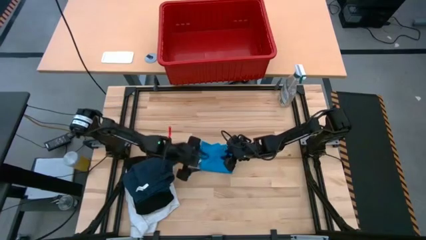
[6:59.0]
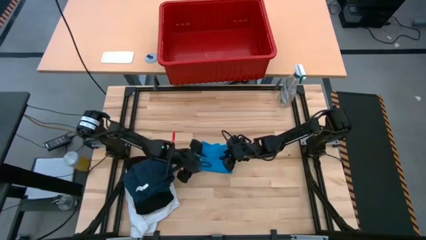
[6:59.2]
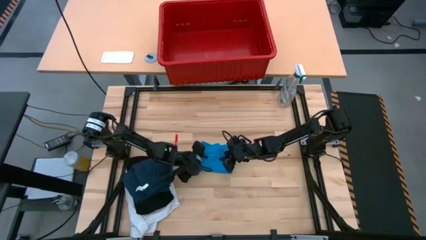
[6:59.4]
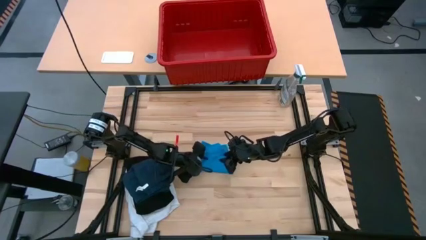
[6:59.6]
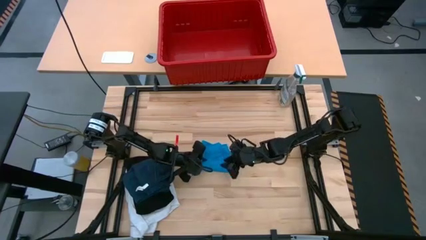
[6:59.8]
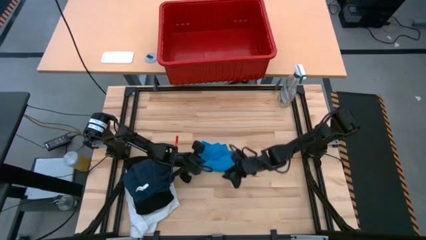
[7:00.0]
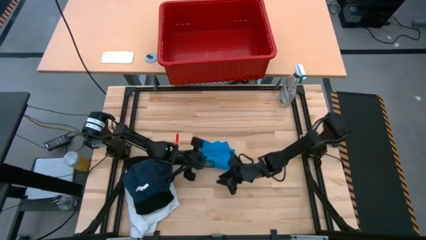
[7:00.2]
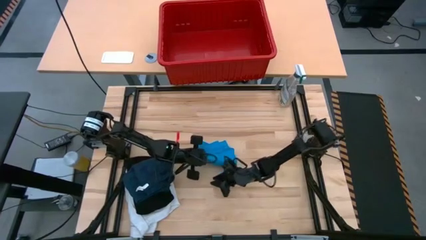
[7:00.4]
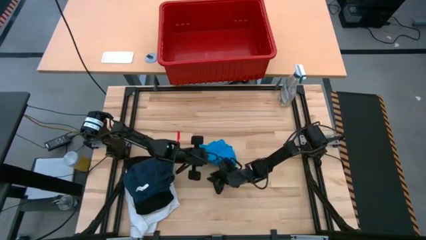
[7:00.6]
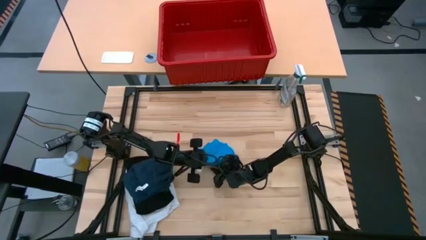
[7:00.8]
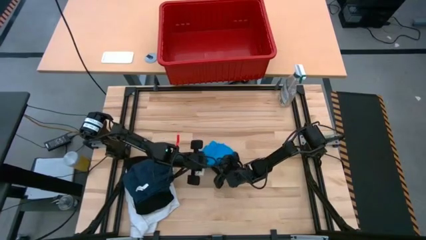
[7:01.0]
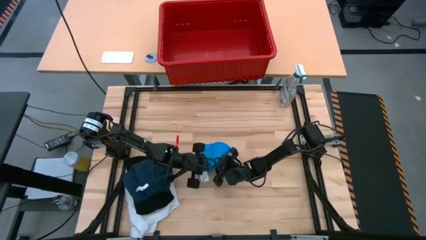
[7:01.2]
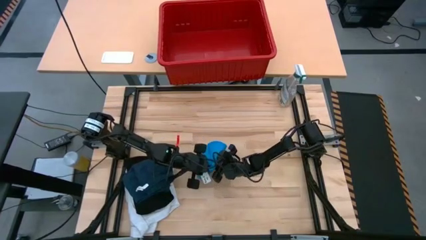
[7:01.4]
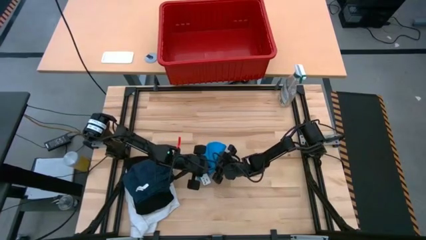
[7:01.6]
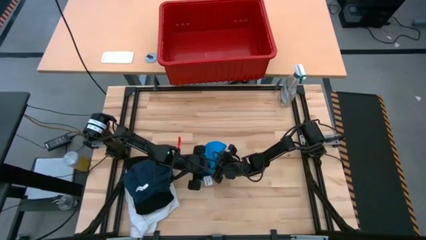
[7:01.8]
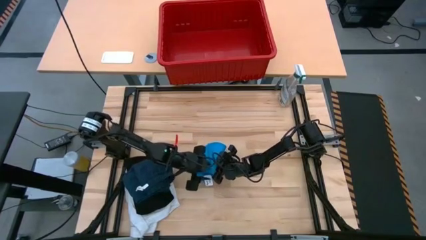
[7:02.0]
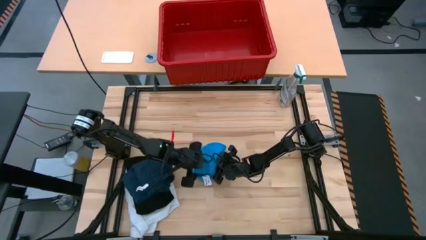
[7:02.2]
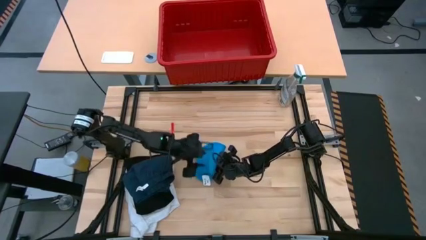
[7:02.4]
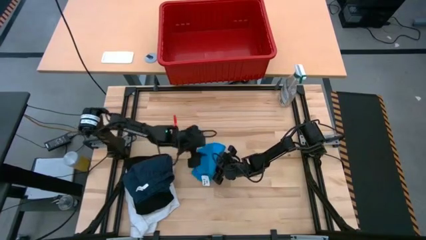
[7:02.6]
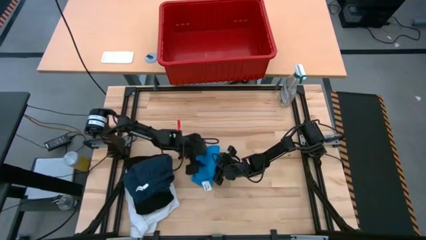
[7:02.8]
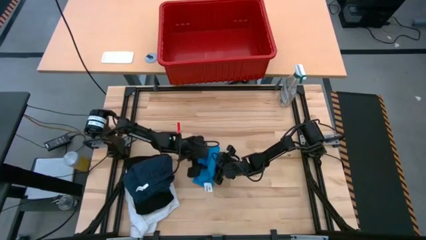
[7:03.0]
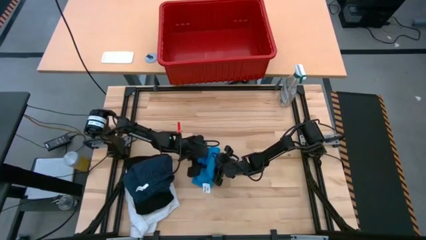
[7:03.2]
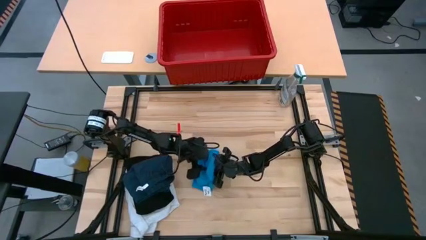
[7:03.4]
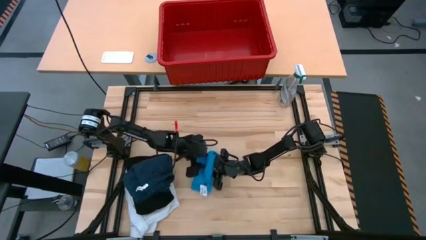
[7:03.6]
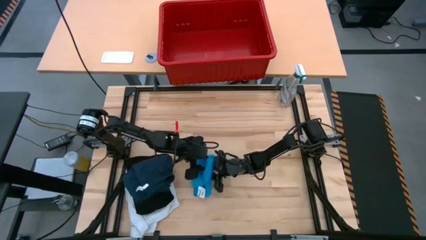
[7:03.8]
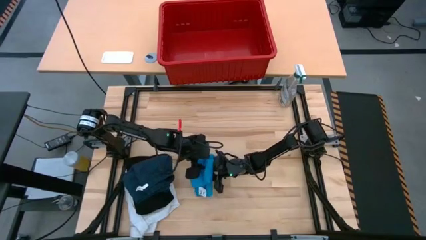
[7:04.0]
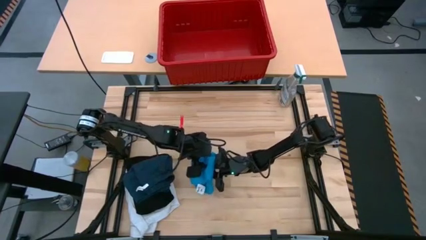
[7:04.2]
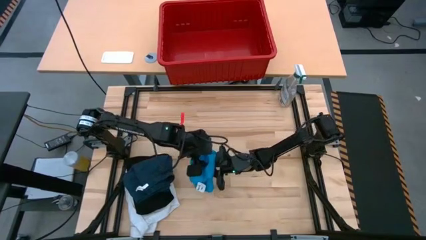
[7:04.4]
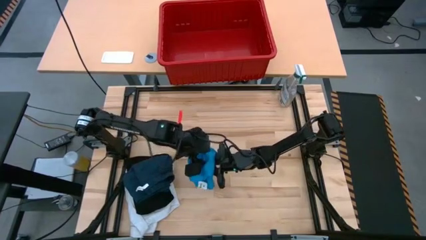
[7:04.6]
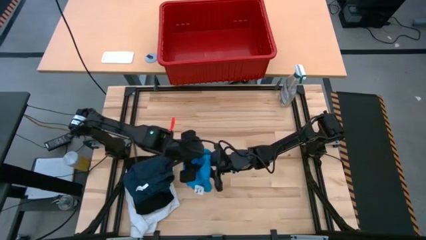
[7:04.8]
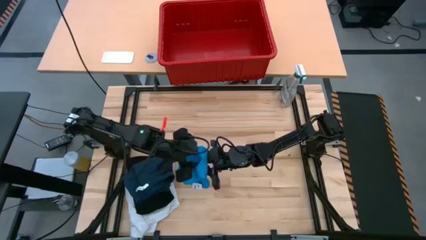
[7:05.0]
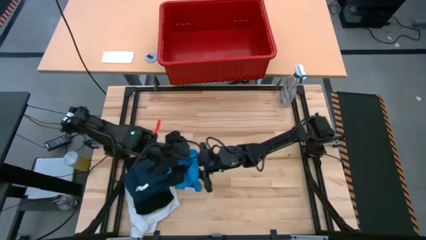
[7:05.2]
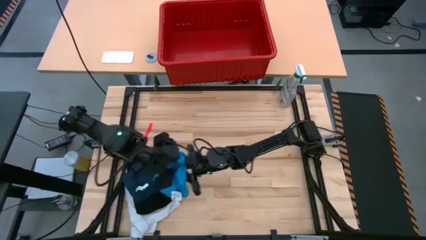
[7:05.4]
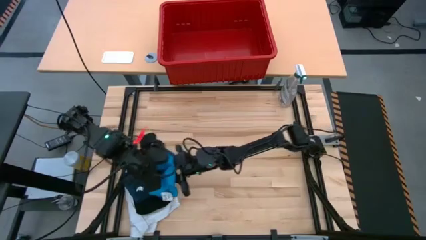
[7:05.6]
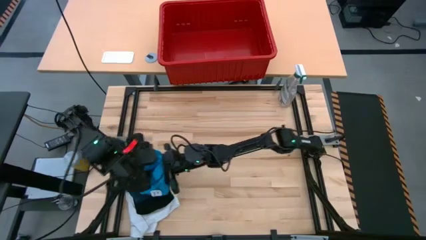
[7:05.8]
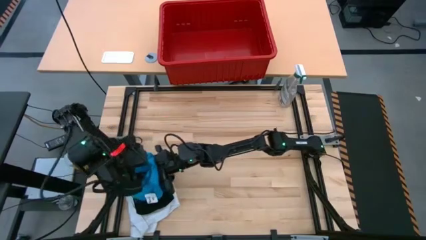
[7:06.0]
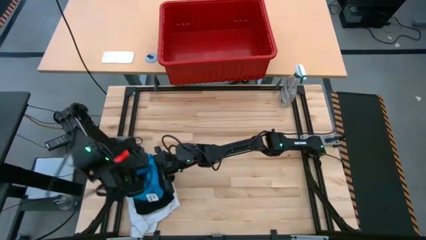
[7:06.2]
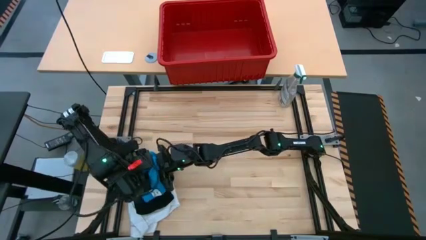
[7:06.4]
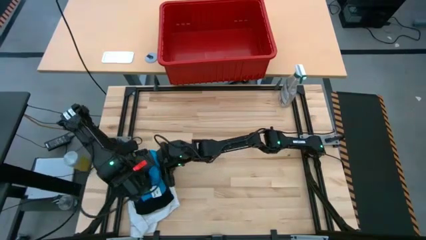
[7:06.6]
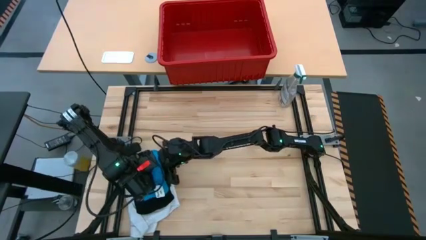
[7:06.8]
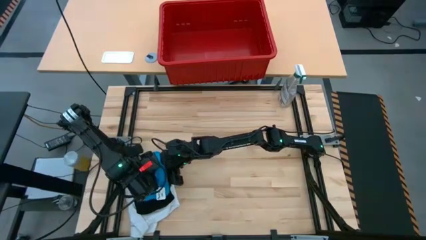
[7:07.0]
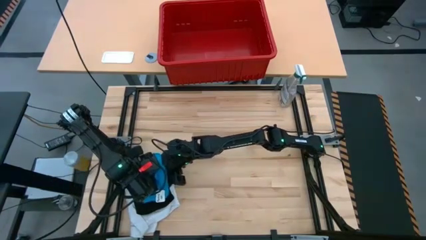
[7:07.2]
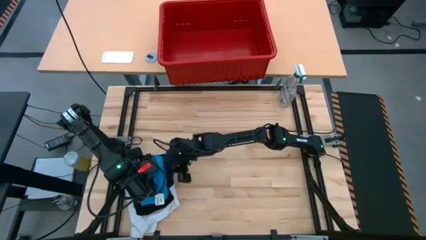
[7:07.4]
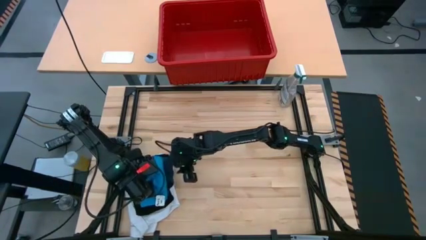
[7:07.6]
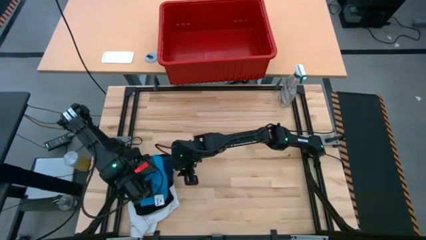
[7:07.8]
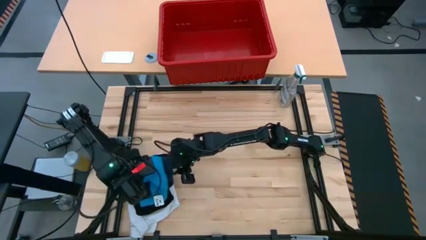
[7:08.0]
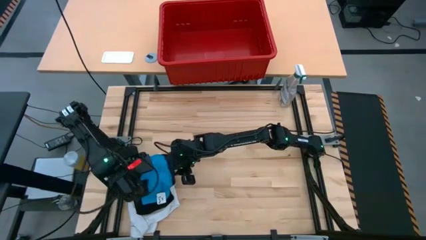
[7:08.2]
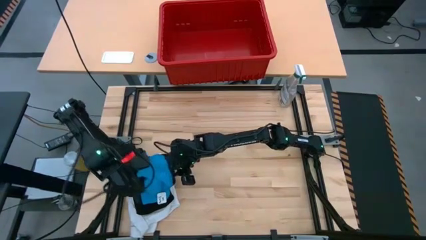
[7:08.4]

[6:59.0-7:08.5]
Task: Fold Laundry from Bin
Stack the folded blue shorts on top of the folded dark blue shorts

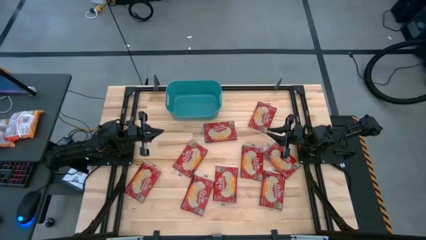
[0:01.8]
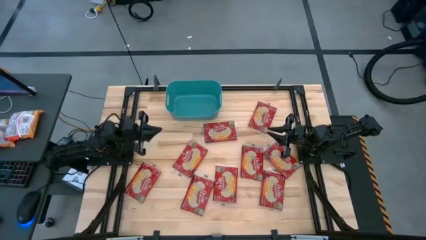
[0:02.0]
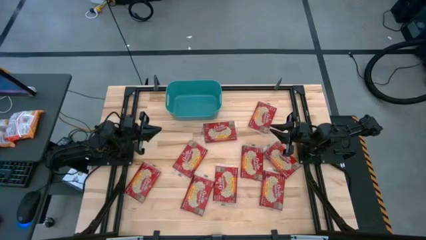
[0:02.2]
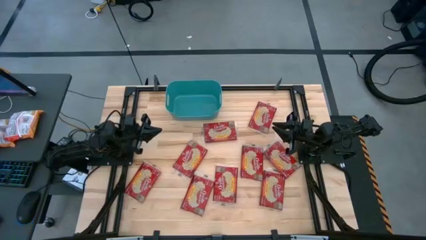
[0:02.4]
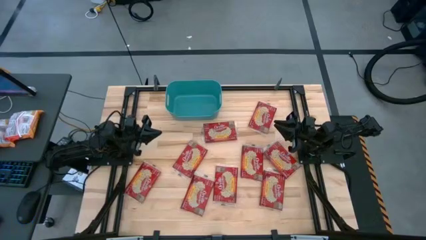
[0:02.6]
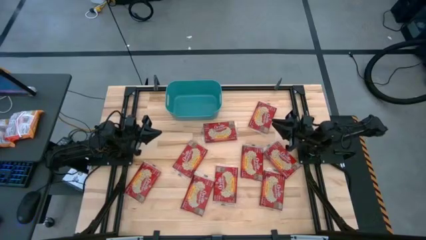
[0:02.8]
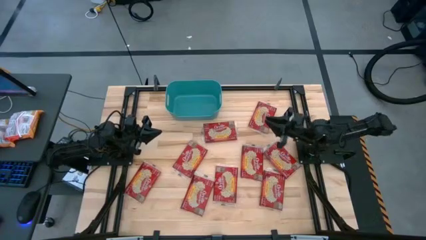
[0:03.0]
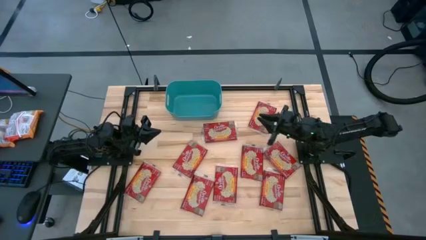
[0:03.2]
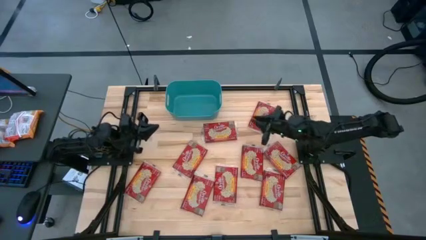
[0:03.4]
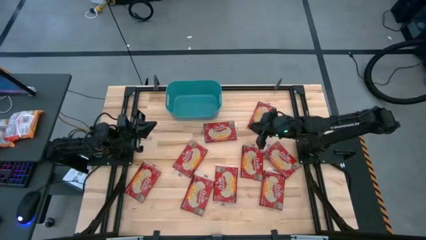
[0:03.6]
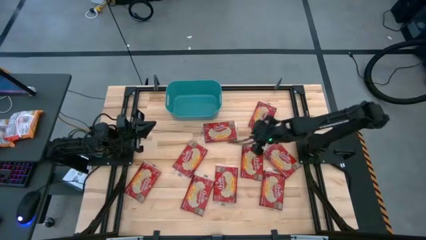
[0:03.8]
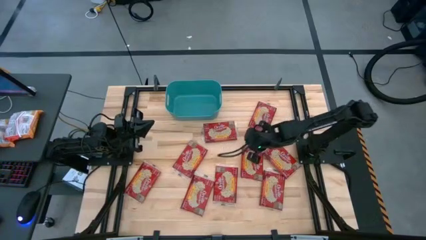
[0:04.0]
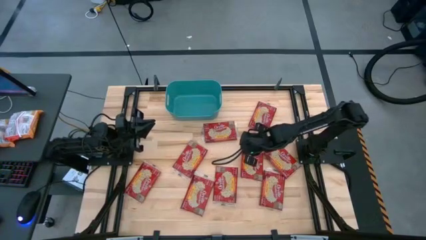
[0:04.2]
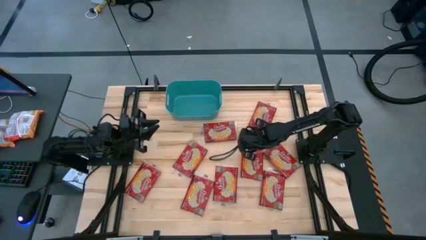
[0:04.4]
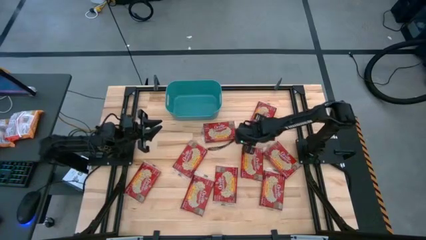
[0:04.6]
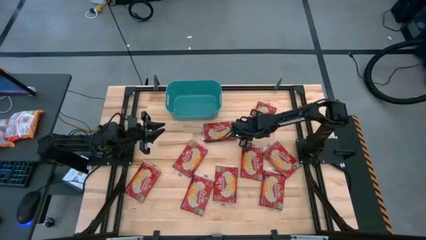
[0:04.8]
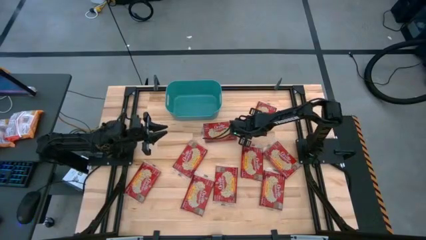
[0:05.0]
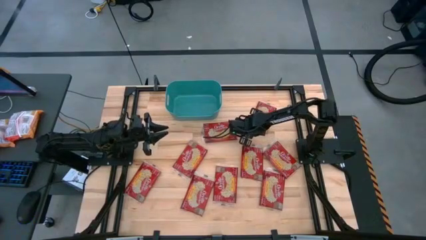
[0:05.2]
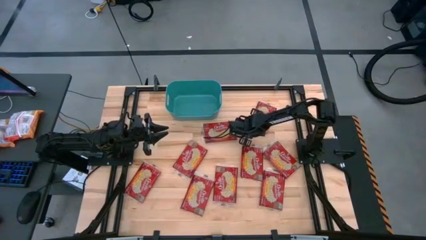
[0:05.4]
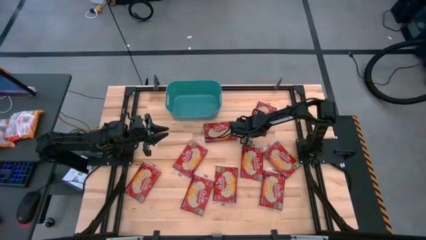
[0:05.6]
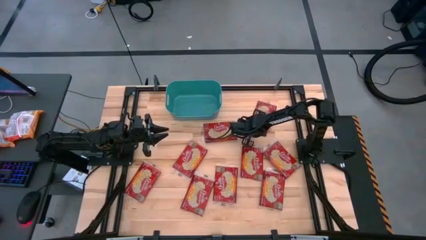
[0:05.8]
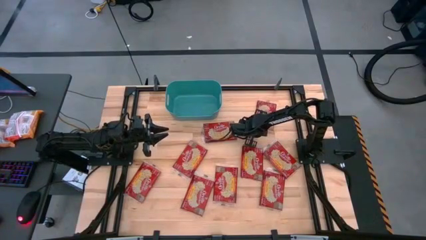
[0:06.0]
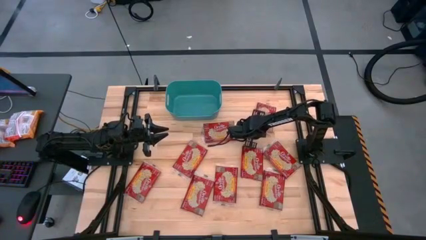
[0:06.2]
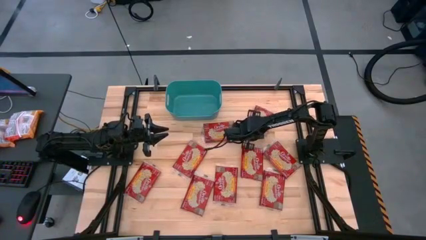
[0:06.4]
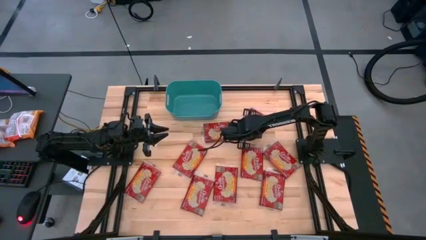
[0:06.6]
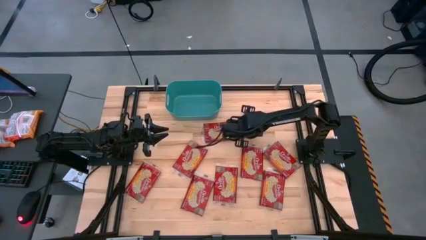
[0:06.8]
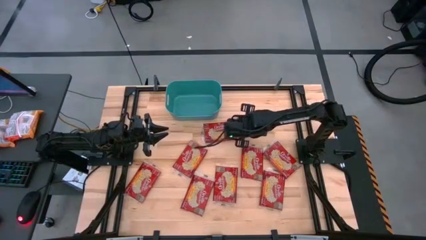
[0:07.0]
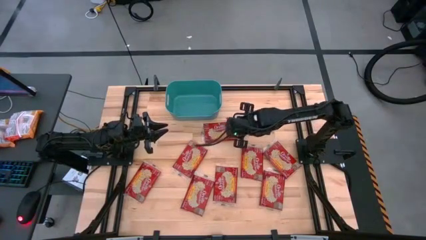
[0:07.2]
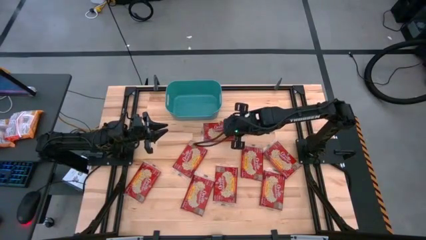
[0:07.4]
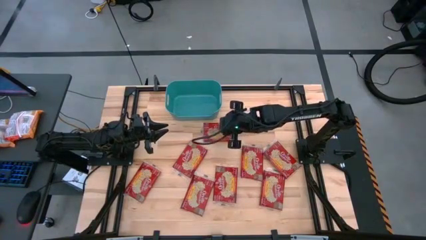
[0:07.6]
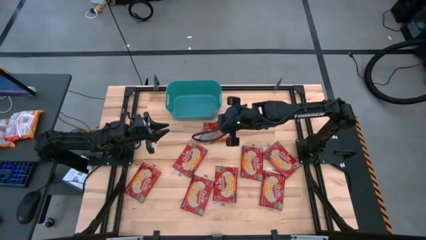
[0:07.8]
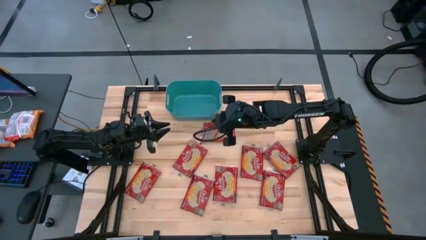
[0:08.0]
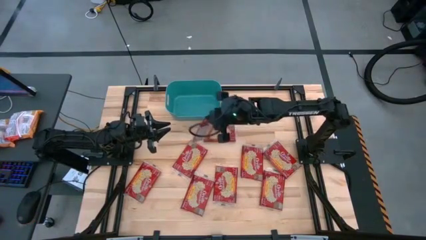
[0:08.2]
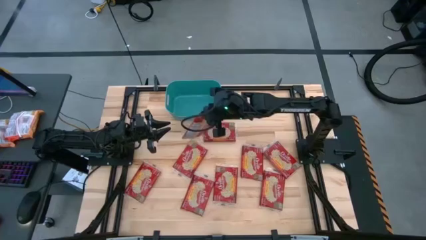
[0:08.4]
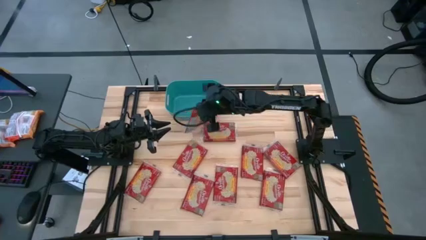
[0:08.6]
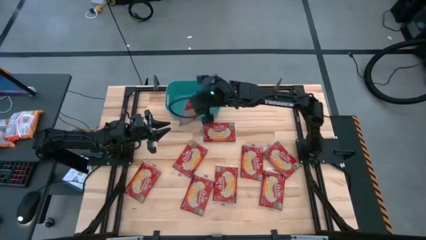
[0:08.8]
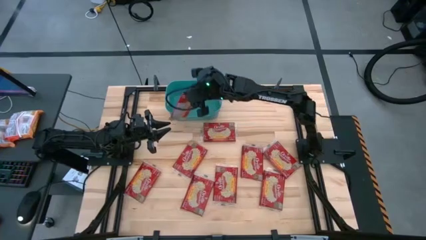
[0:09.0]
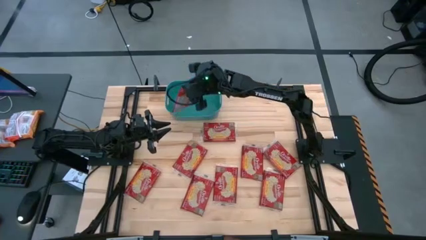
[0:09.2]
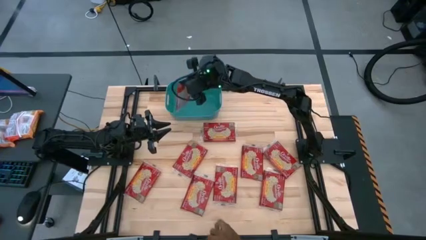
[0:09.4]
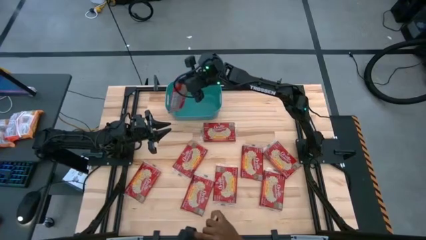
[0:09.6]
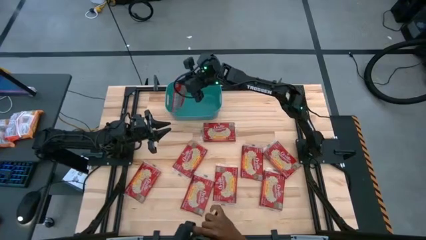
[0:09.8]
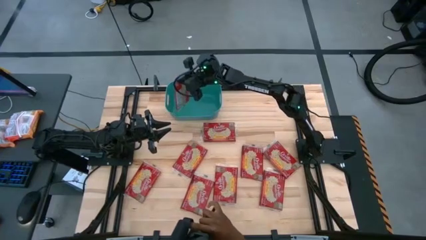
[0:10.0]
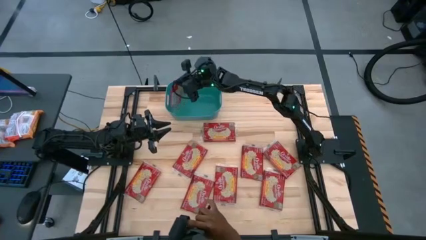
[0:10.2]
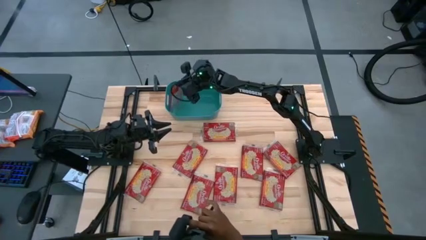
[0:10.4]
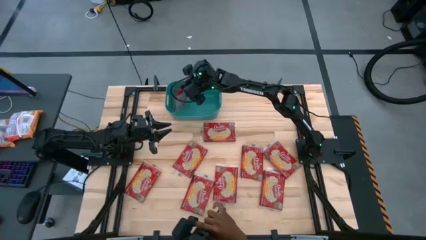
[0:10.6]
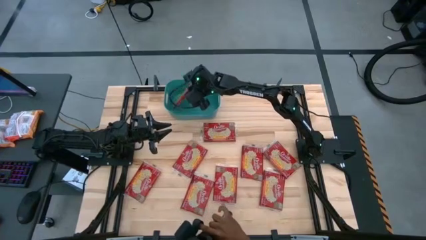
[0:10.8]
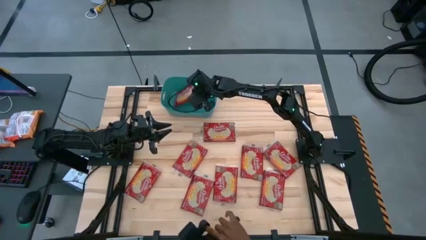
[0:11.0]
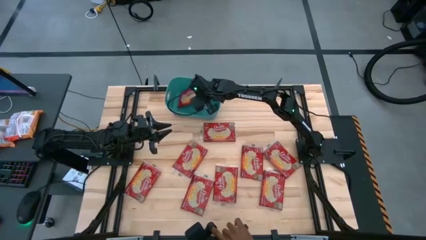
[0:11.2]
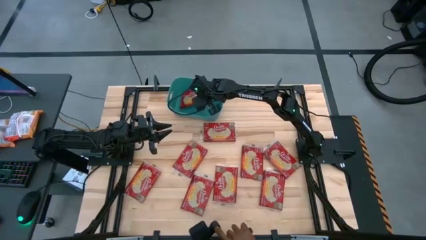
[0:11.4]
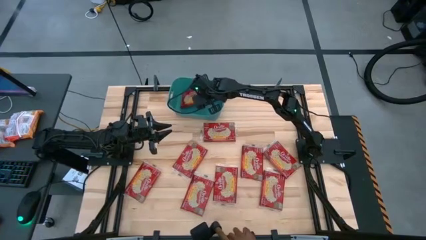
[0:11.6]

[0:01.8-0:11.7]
Task: Sort popcorn bags into baskets
Put the red popcorn bag into the green bin
